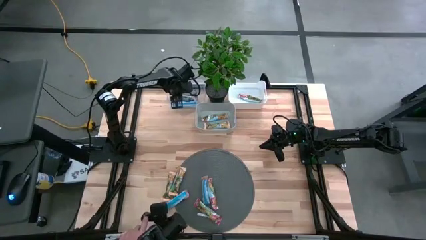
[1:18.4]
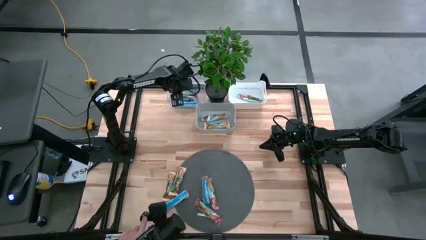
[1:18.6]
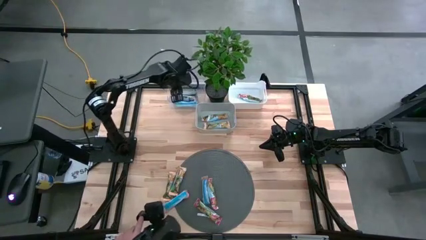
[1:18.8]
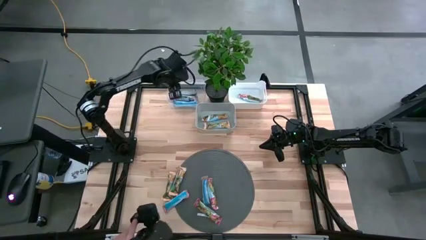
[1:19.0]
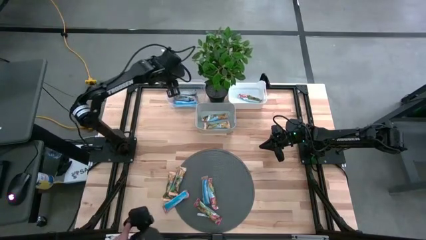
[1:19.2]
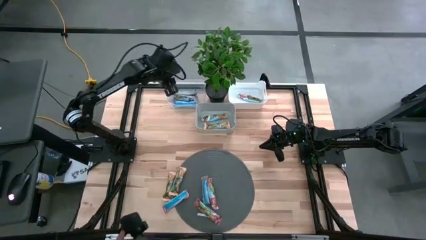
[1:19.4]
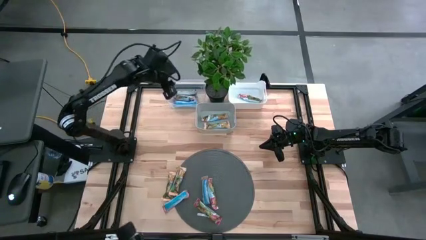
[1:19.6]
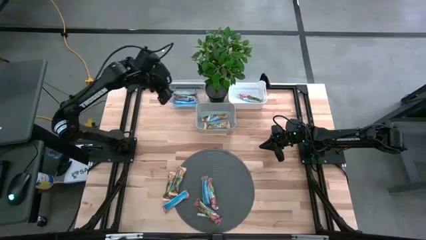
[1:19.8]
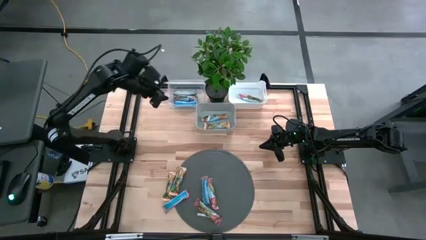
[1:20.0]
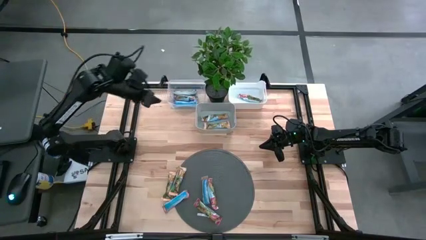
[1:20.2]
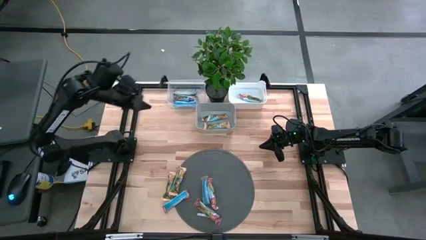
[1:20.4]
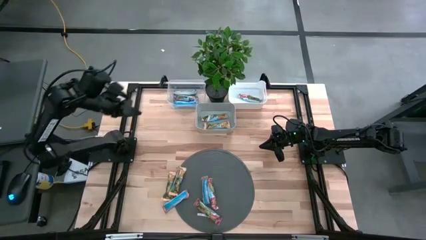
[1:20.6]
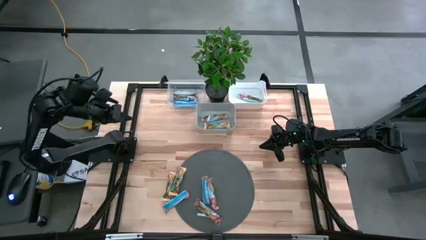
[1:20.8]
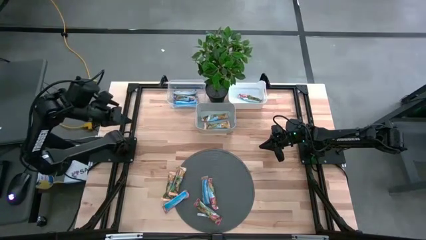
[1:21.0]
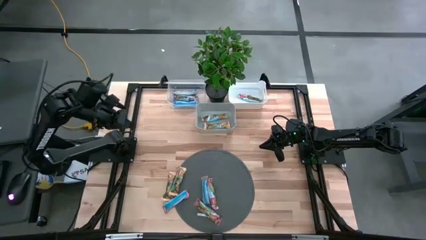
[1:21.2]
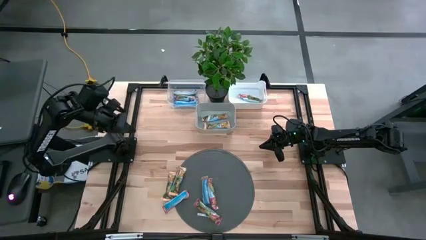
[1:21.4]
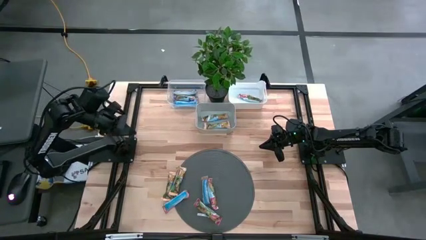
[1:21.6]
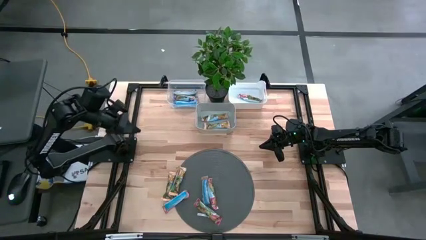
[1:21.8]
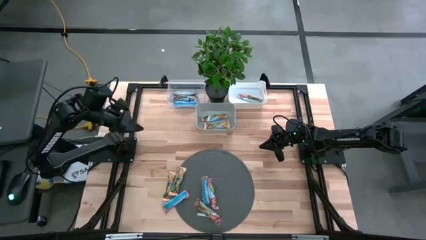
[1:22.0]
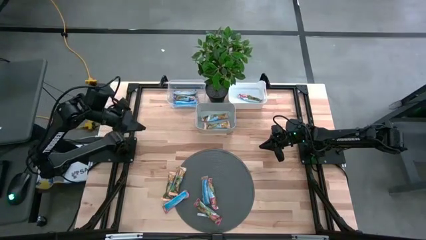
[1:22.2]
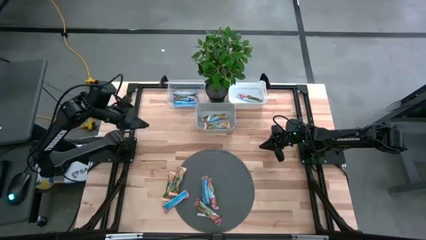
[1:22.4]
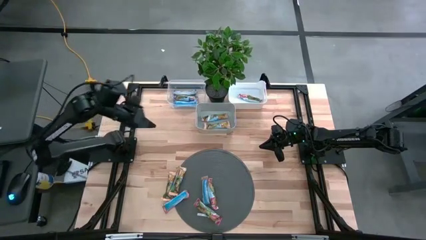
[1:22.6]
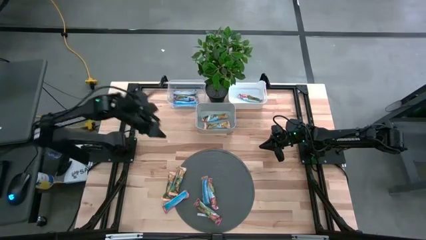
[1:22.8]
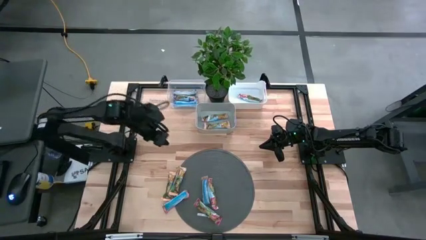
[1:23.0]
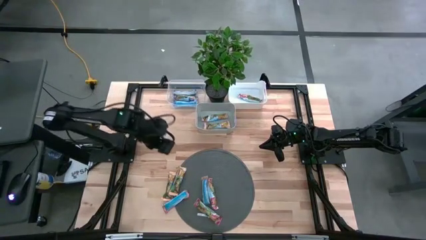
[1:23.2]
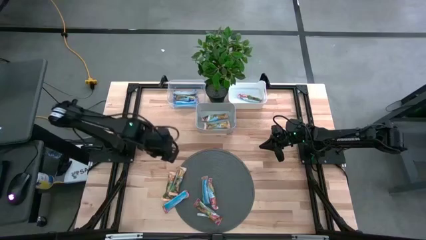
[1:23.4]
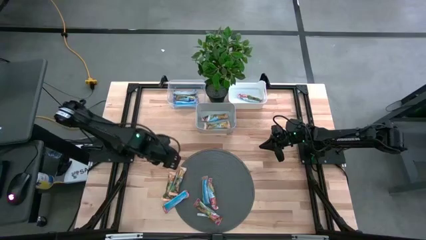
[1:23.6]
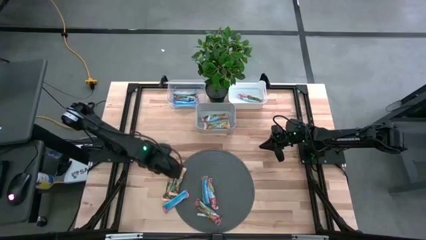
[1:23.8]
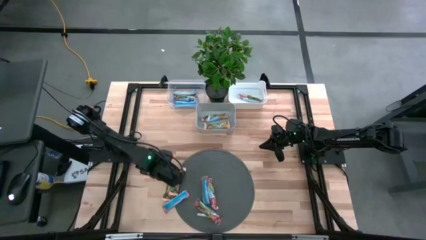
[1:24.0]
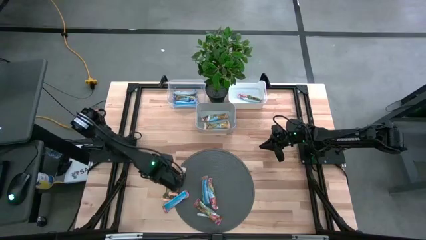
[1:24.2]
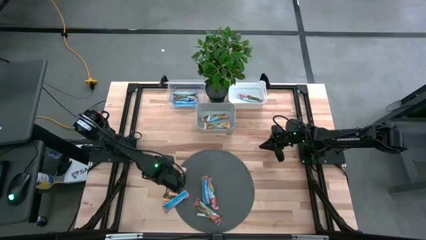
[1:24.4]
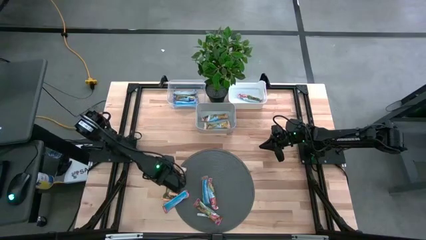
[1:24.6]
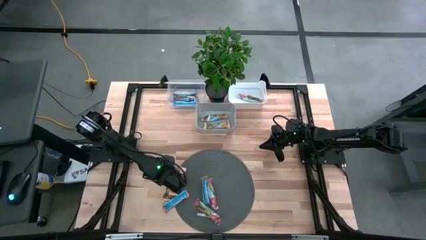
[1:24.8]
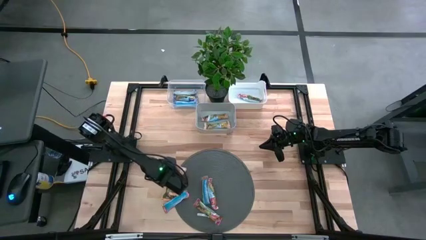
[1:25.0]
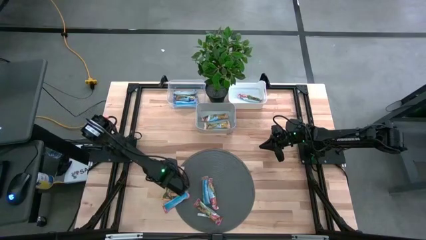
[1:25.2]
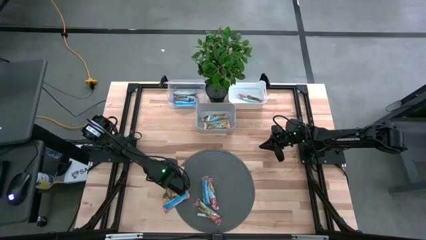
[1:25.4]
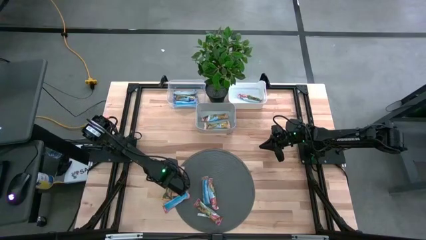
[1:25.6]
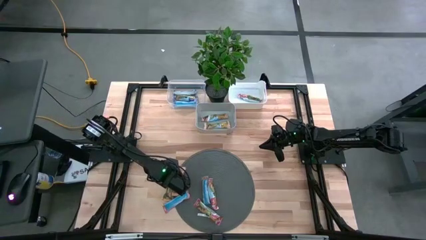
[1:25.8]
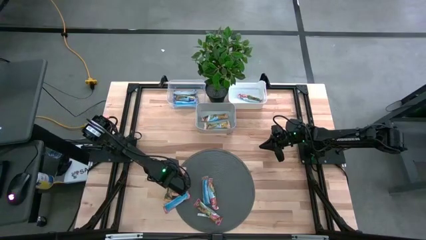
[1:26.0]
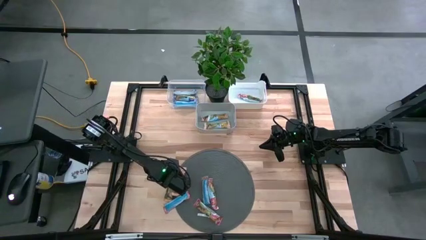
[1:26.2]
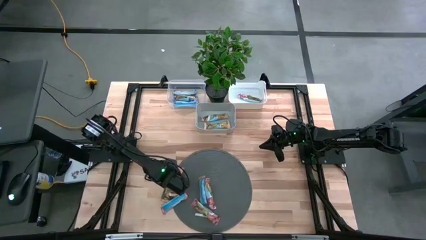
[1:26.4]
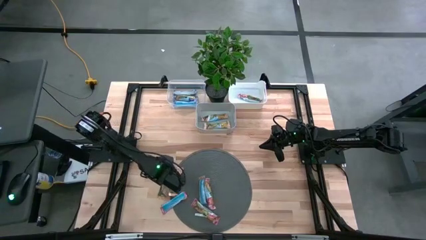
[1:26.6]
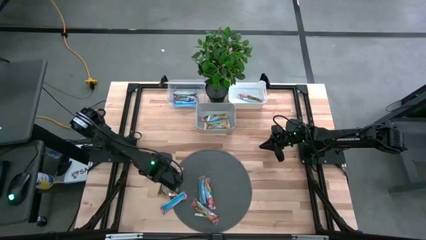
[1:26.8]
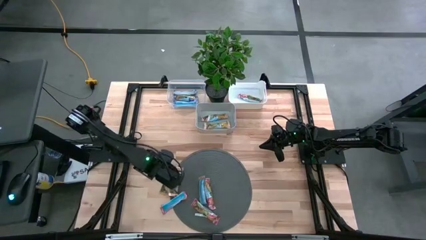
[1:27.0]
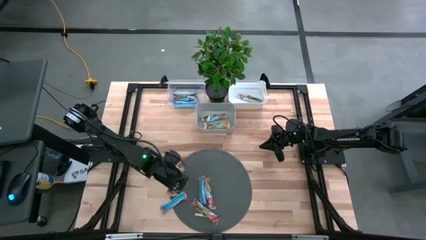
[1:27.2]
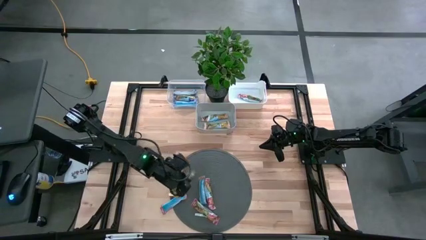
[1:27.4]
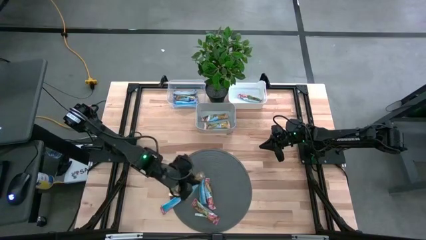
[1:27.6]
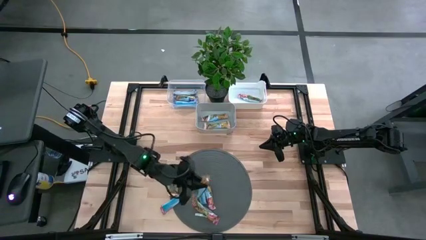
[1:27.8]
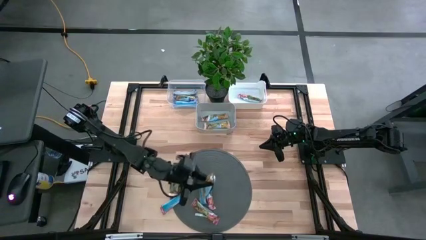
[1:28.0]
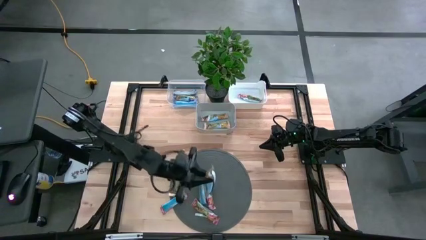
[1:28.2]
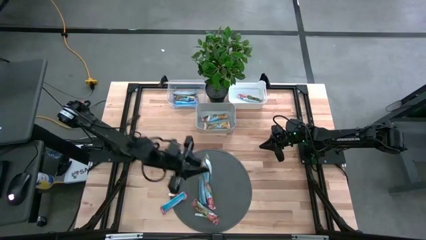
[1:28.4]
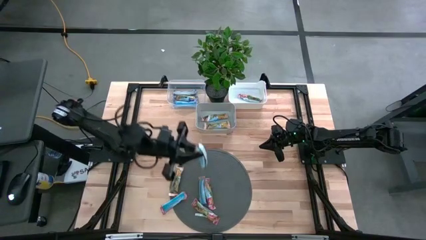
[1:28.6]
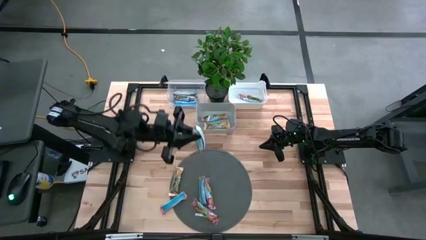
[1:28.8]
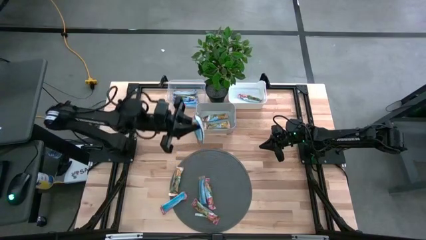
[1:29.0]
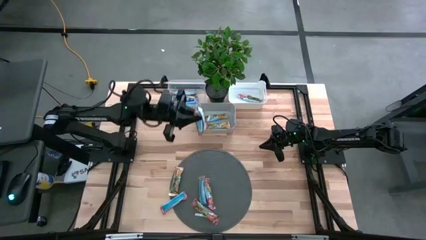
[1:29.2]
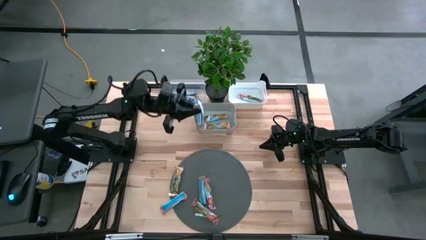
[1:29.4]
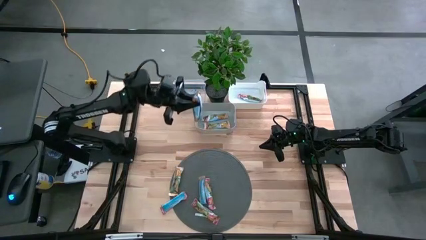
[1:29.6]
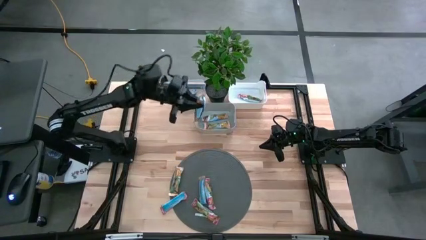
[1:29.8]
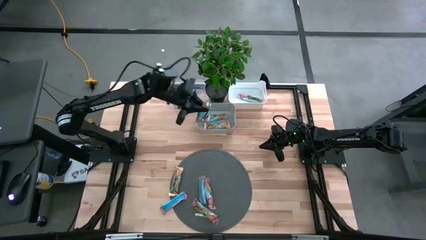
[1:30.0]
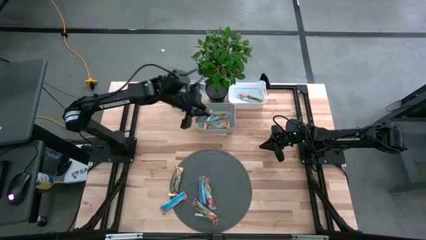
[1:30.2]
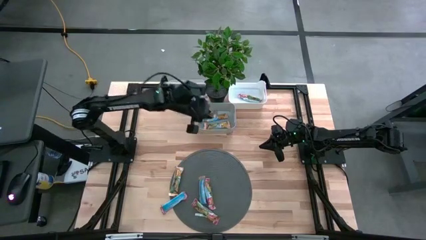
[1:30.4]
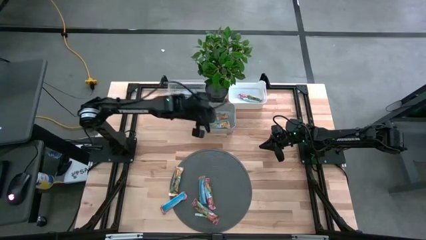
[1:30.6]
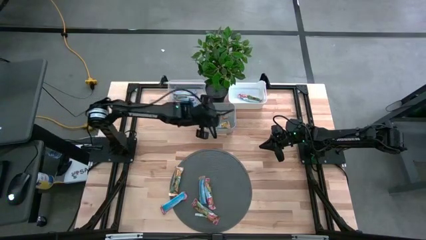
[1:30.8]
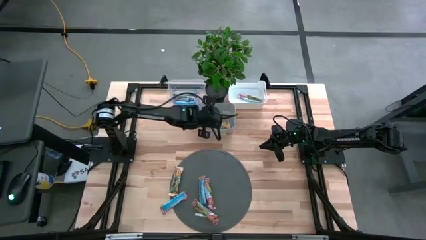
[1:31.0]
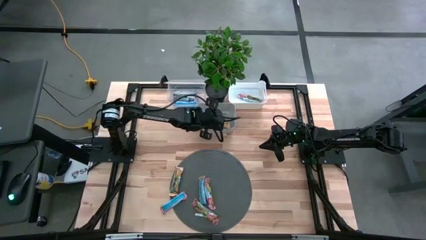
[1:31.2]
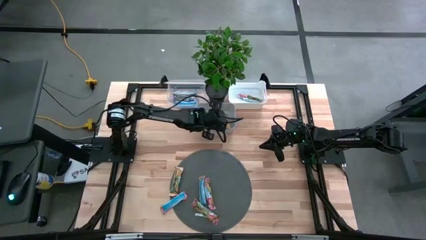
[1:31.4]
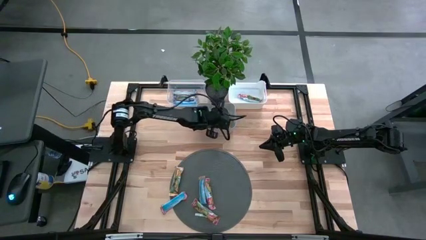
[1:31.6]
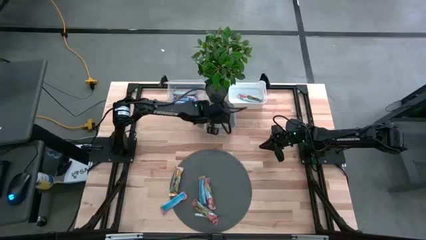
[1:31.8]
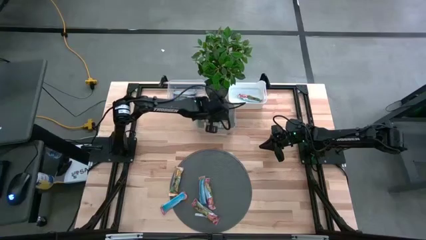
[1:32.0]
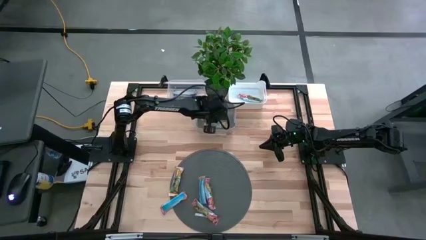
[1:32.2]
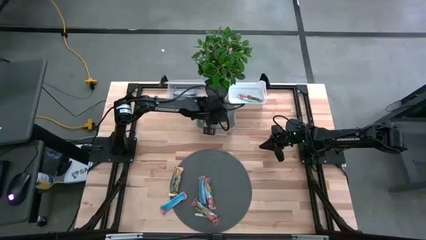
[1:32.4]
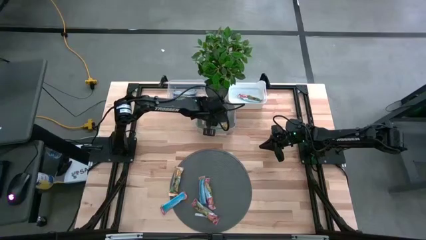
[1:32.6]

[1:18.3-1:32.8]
Task: Pick and place Granola Bars by type
Put the orange granola bar into the gray bin
